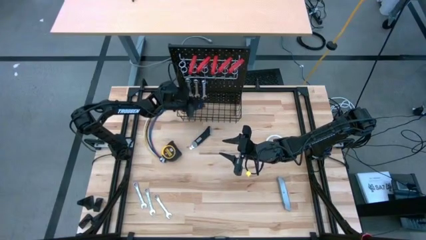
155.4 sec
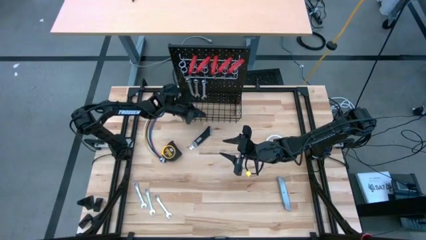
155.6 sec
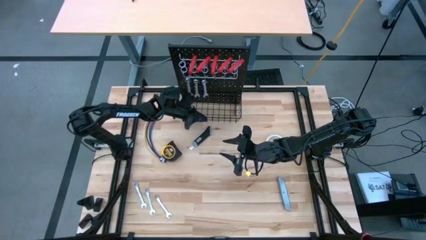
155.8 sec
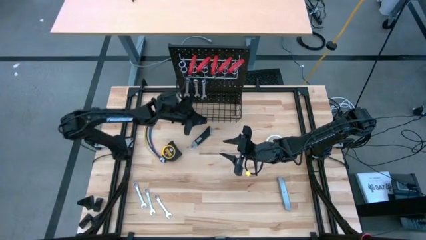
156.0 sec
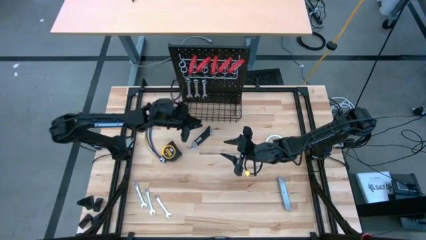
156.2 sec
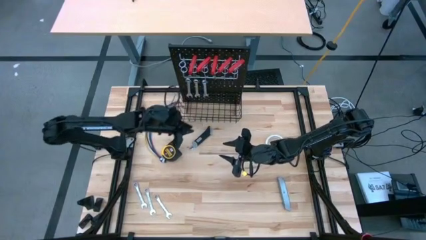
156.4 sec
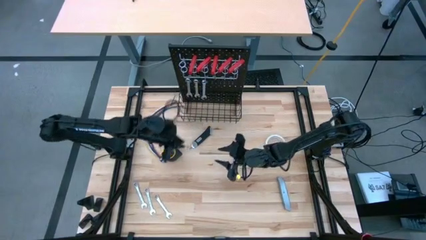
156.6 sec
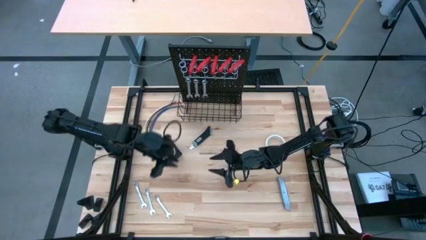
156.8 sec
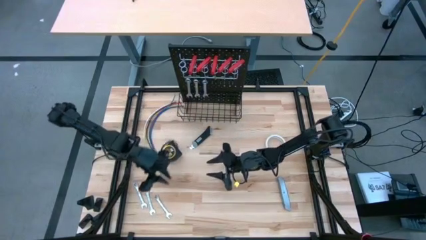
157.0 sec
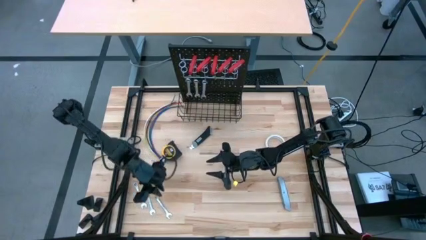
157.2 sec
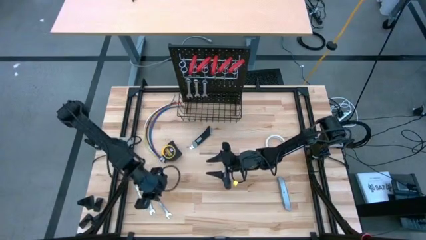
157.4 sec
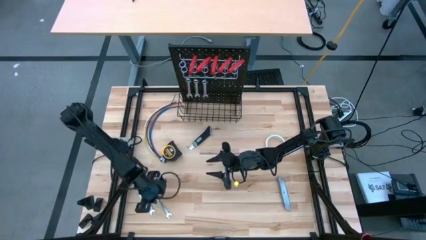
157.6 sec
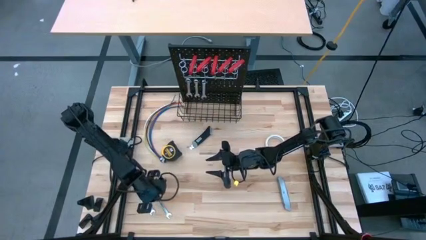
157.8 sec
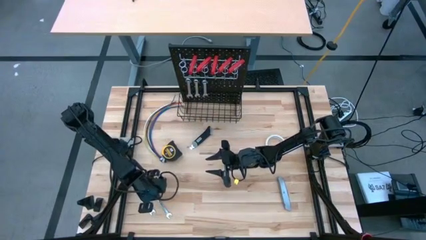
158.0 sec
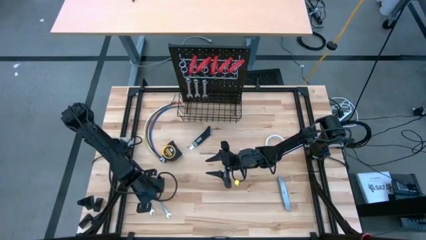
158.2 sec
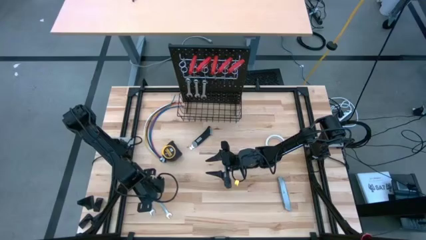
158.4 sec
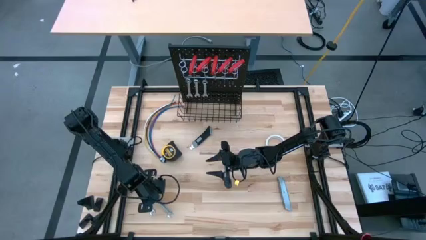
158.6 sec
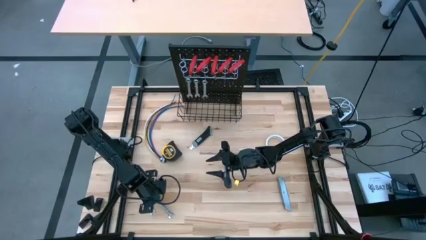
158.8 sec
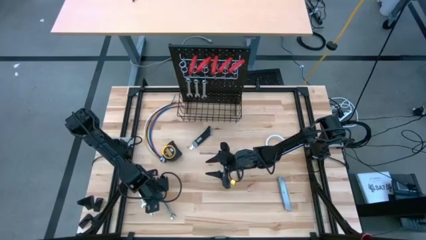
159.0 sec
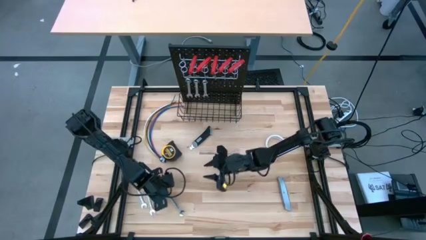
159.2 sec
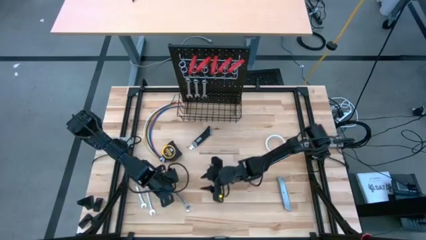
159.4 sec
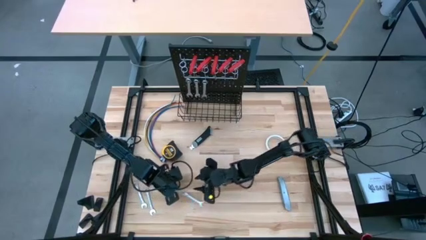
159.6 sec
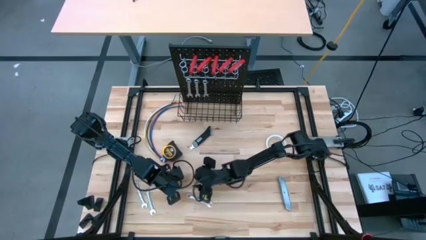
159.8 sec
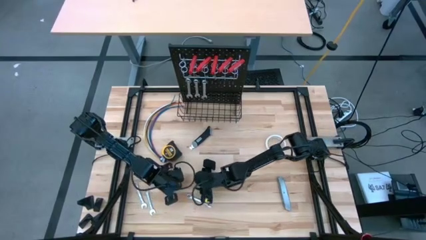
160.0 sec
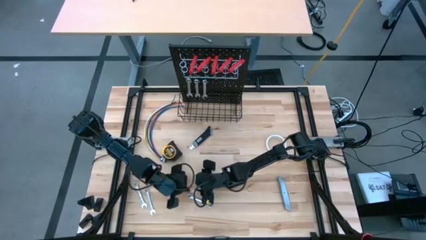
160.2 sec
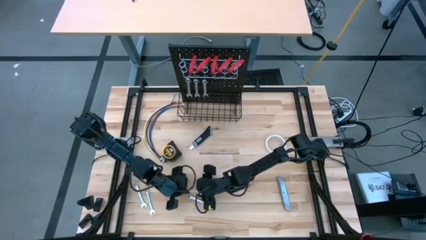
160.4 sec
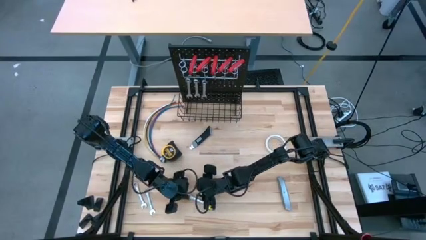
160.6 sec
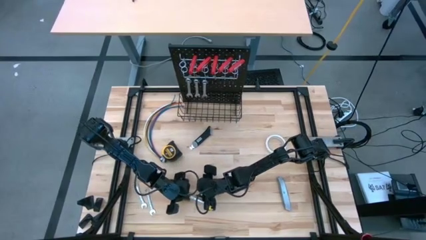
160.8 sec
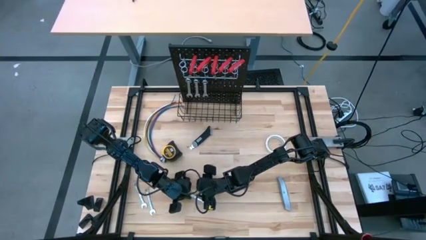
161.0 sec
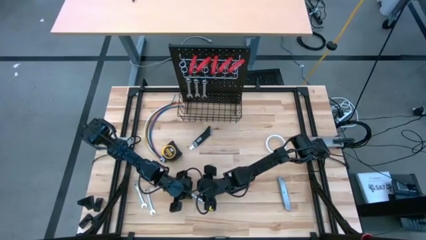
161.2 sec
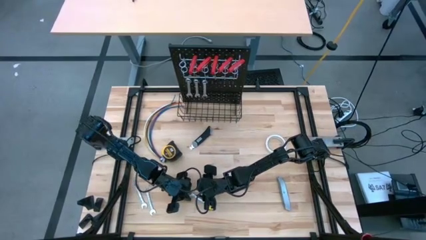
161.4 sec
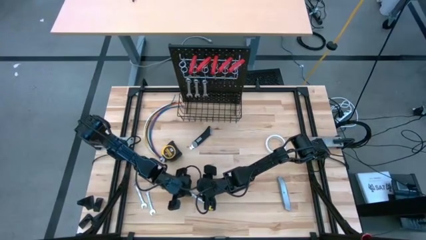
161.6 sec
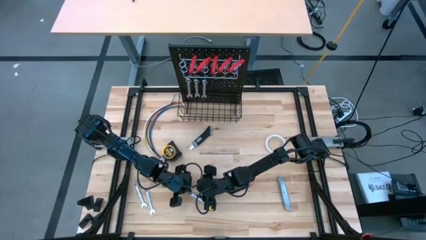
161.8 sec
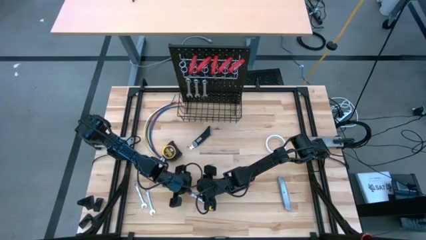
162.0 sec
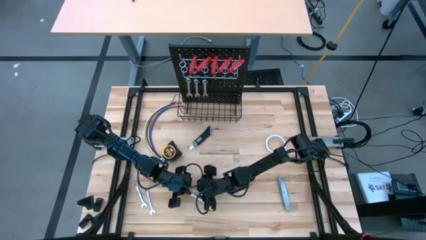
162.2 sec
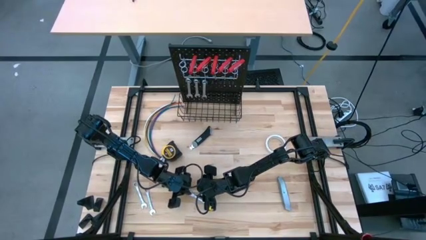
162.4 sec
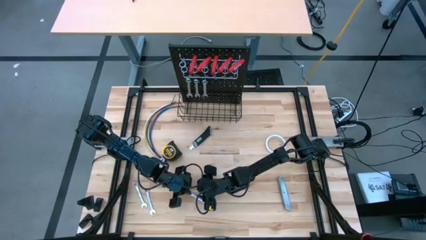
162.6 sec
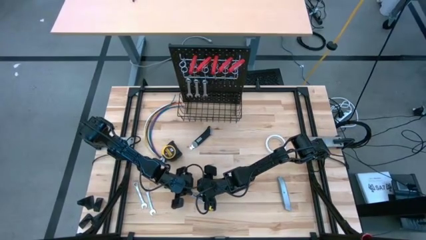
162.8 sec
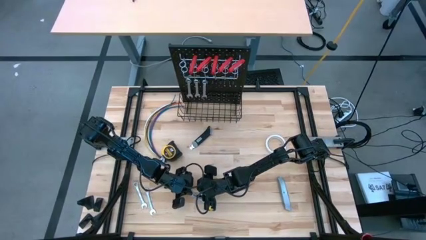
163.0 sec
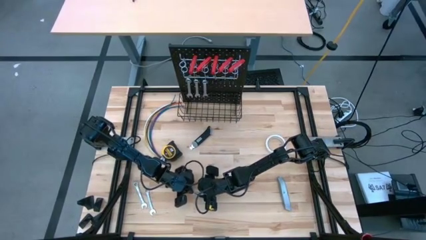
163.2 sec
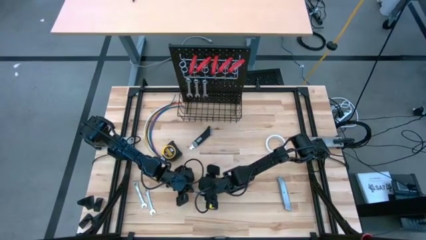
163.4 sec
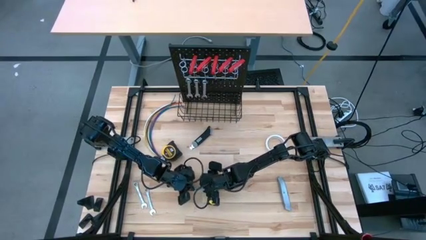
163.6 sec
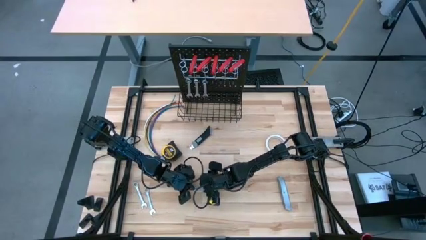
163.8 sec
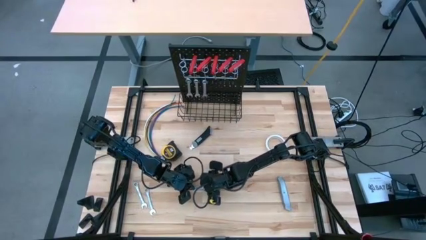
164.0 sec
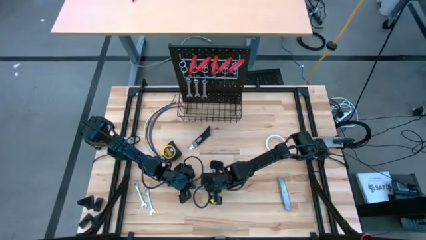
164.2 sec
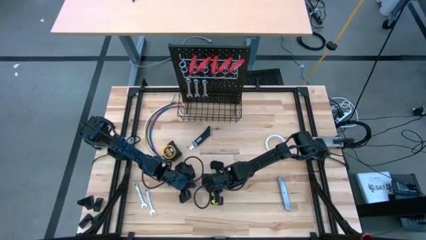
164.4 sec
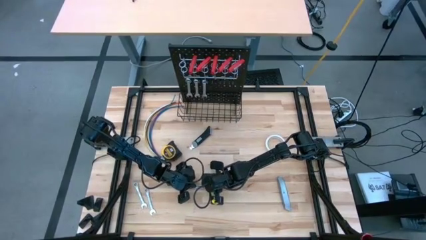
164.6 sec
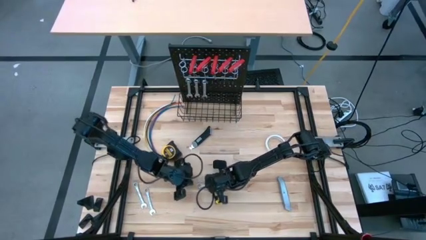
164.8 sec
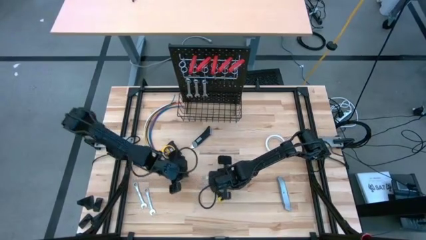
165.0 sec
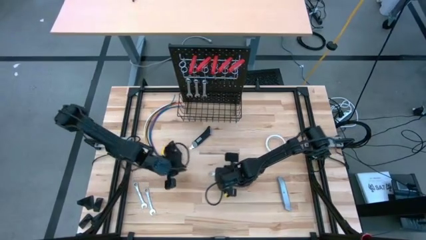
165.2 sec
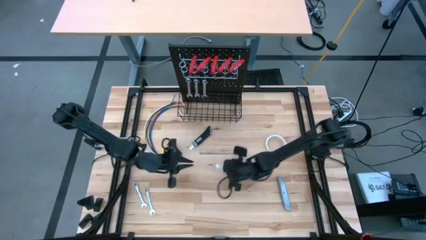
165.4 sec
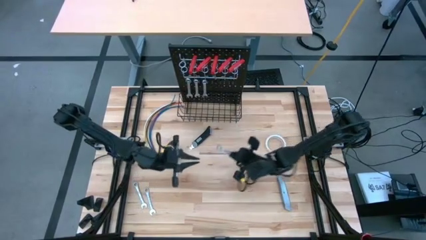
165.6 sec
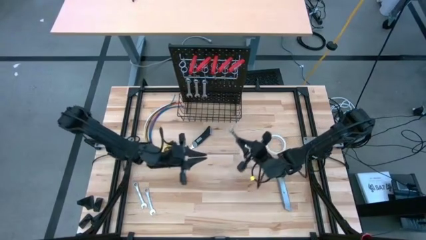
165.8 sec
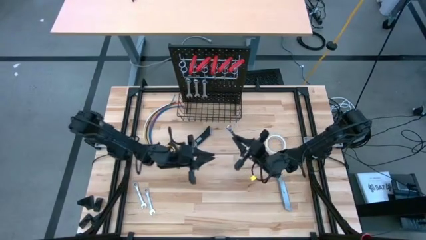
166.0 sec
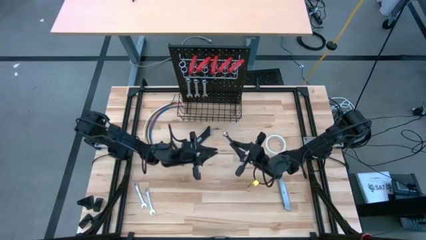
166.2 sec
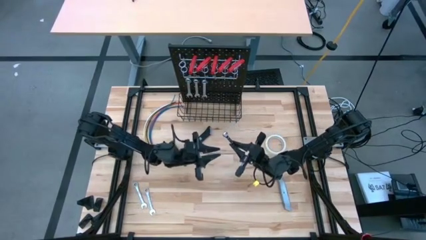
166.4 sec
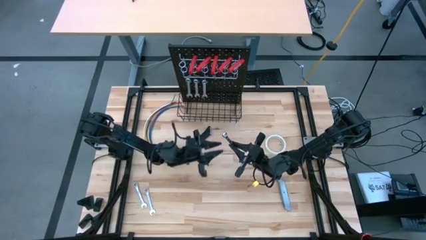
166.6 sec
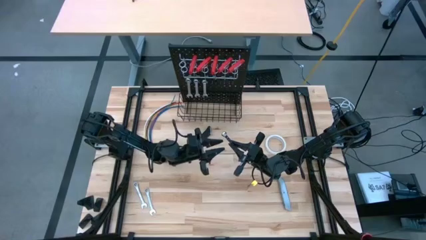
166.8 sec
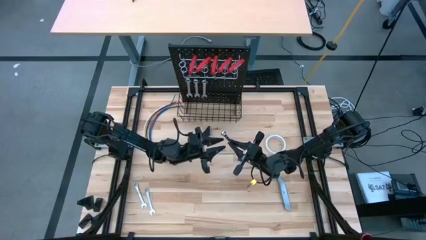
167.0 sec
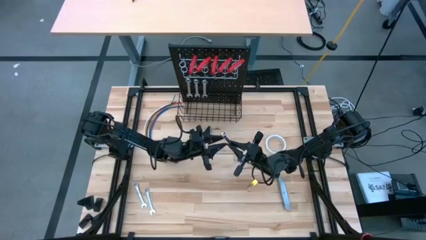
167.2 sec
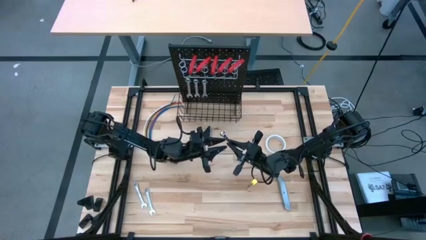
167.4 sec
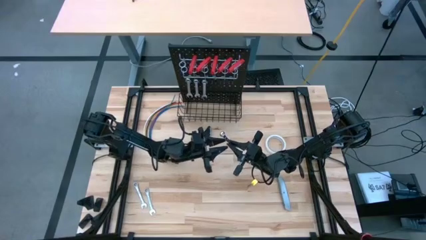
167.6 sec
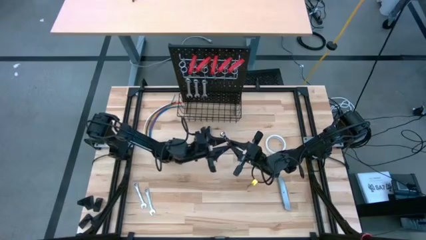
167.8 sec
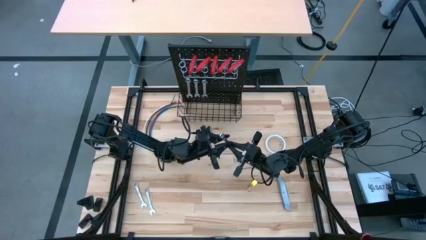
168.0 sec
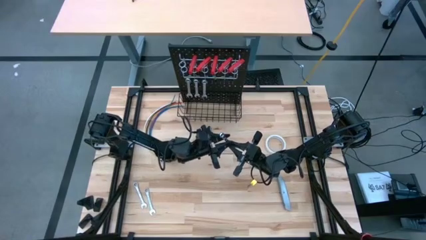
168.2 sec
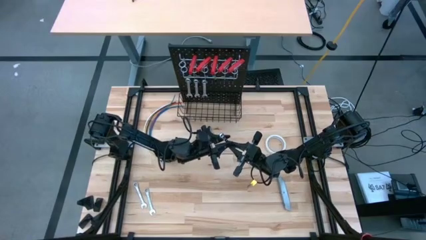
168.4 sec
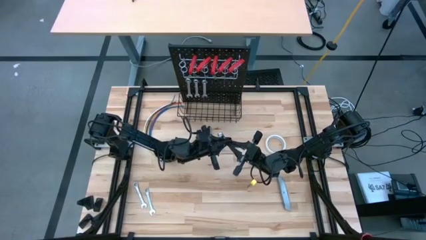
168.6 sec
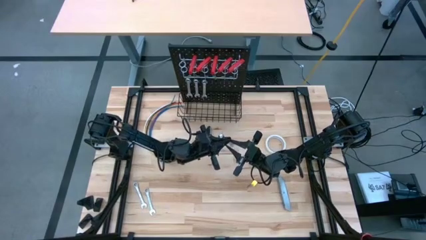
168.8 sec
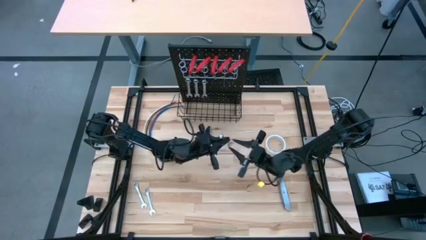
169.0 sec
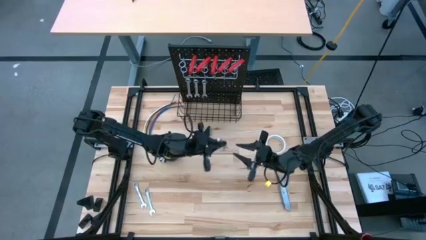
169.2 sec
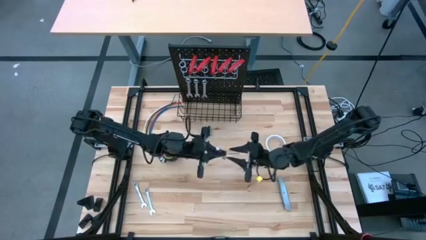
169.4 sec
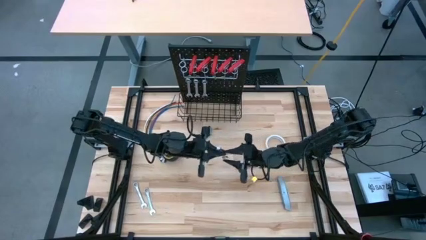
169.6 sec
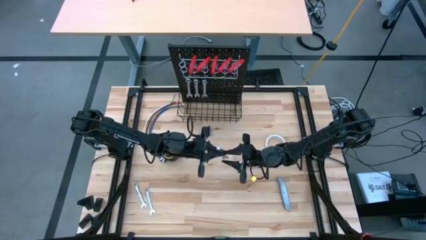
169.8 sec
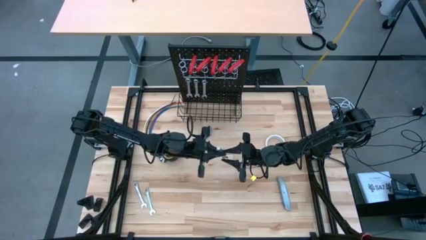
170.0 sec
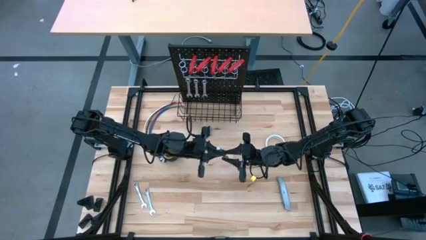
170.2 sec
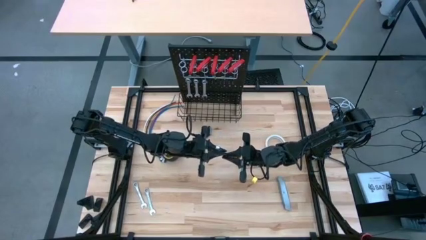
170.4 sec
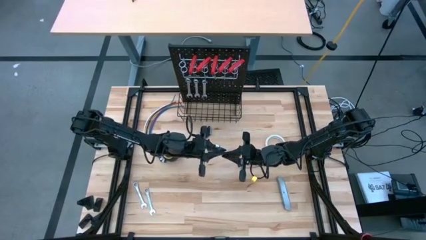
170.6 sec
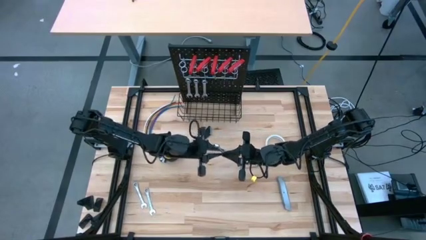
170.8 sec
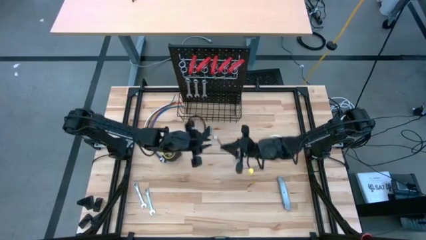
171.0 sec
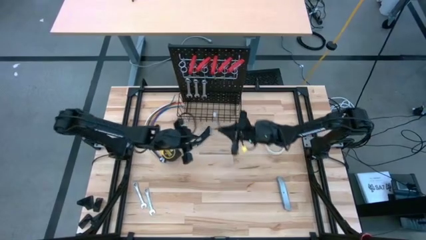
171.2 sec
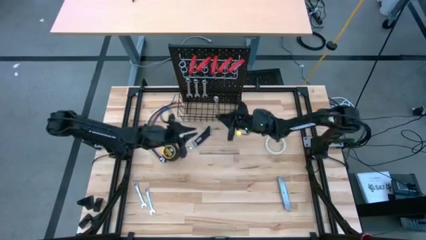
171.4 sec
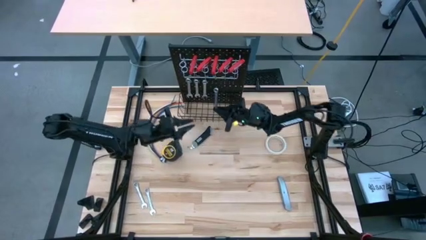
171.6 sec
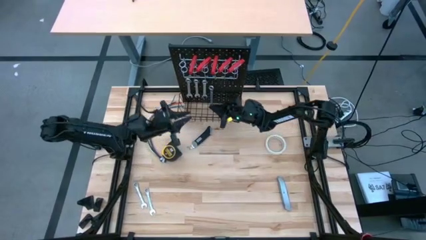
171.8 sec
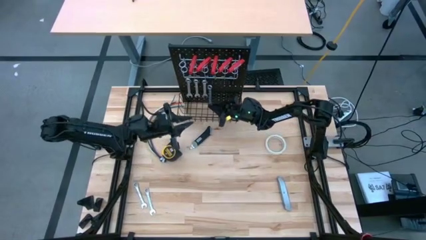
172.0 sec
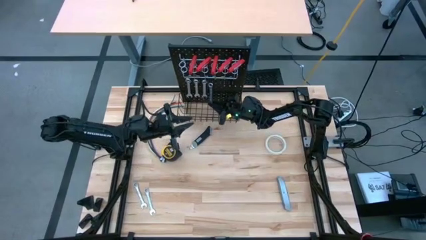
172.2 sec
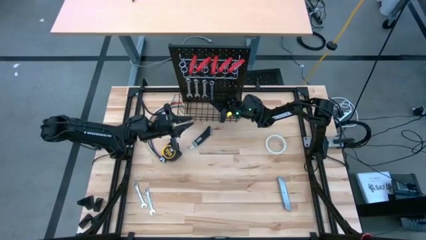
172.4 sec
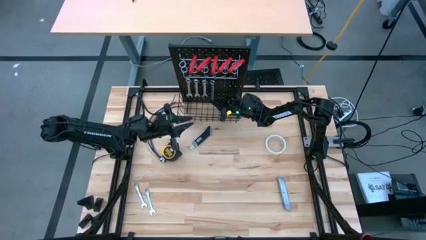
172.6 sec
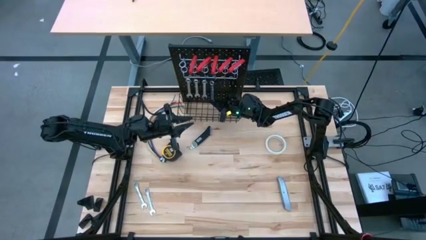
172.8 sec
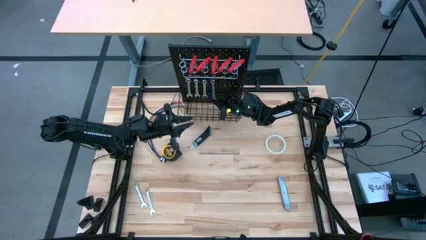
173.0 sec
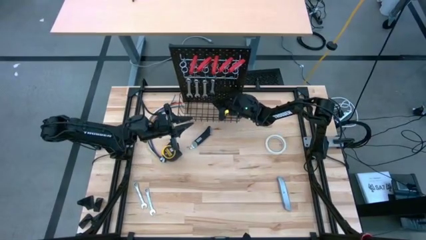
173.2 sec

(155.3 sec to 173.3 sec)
Task: Hang tools onto peg board
Hang the right wrench on the peg board
